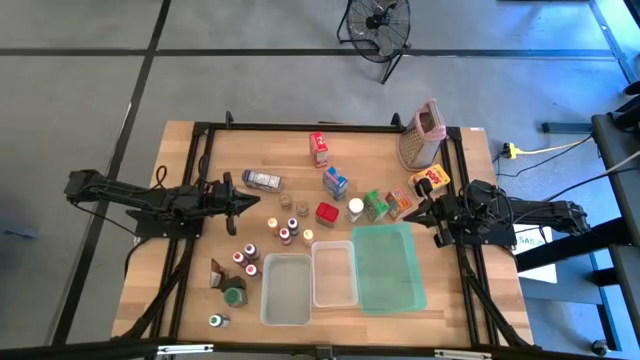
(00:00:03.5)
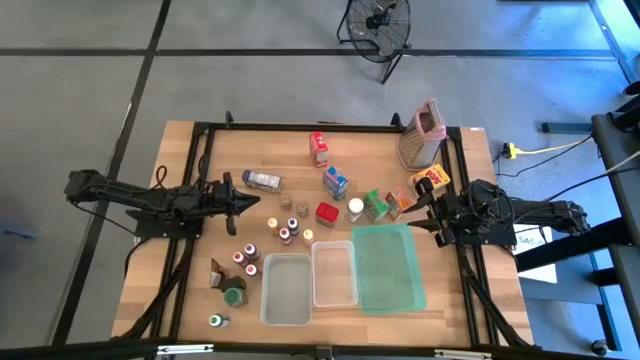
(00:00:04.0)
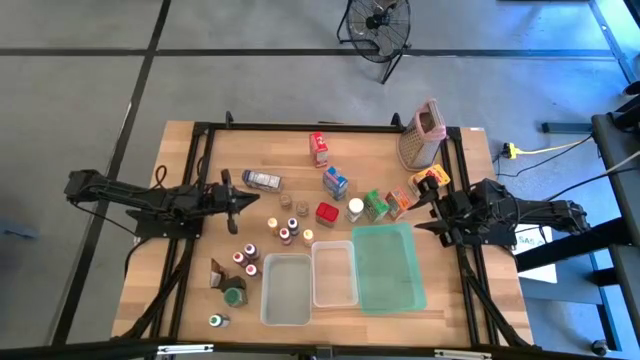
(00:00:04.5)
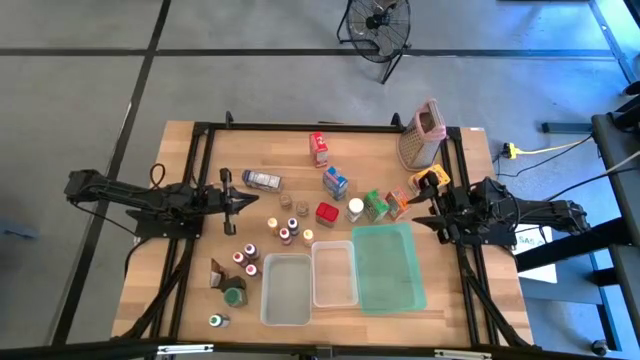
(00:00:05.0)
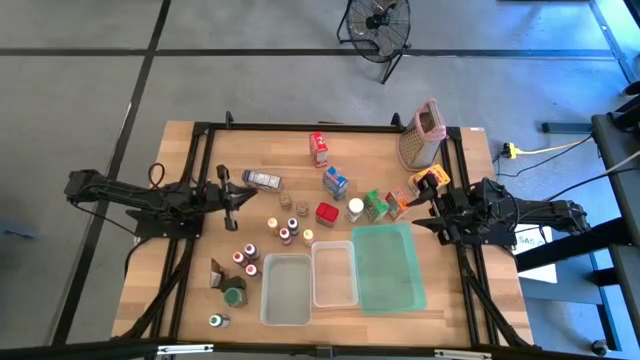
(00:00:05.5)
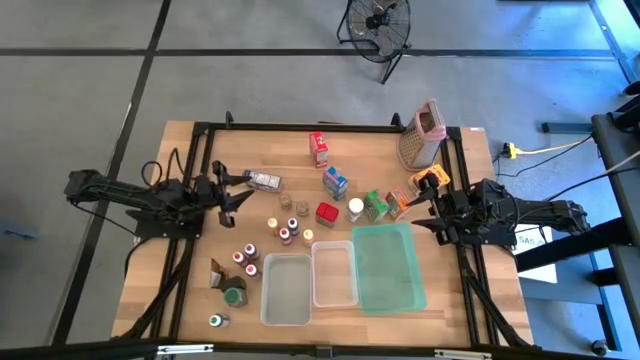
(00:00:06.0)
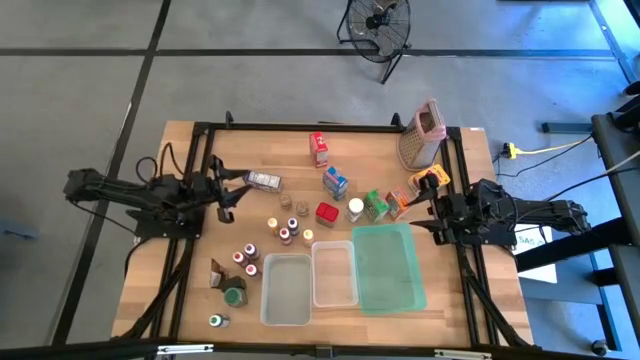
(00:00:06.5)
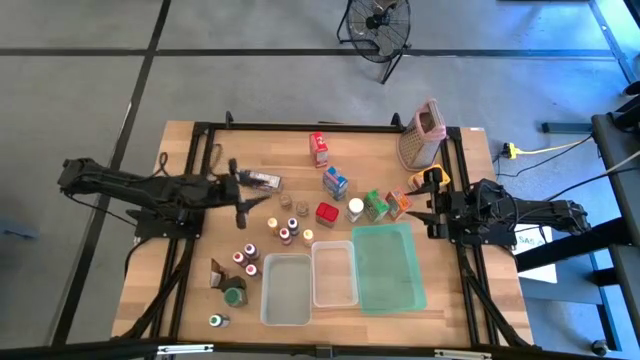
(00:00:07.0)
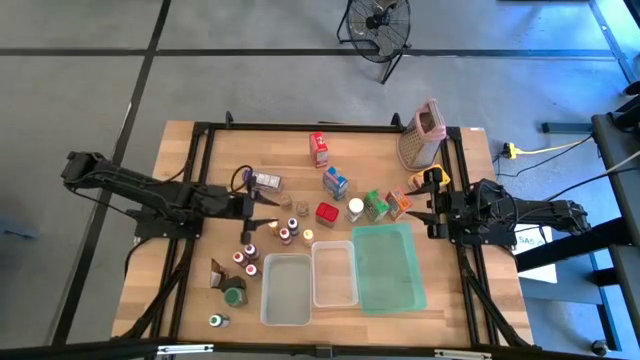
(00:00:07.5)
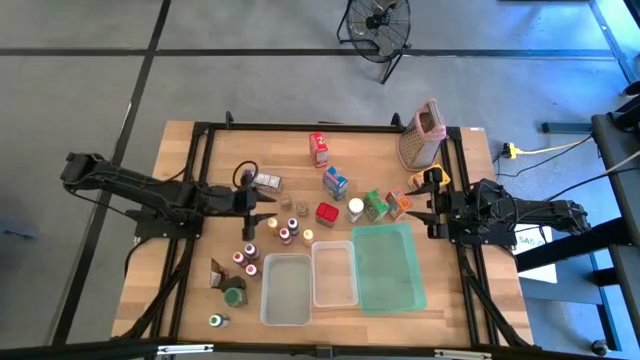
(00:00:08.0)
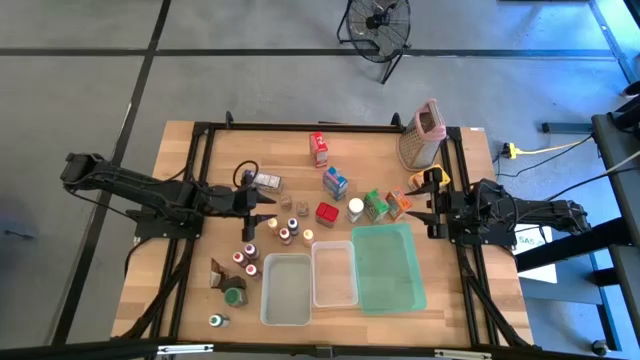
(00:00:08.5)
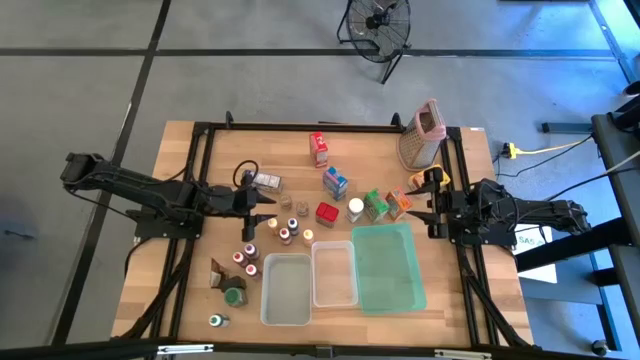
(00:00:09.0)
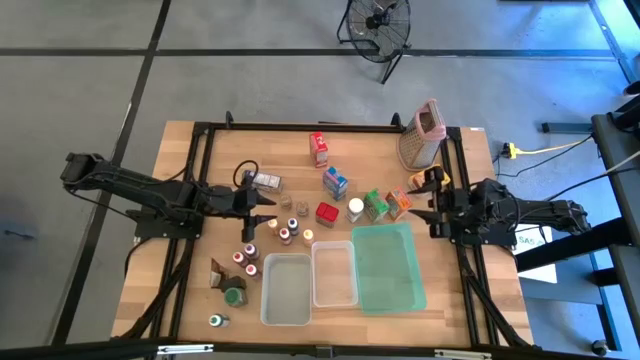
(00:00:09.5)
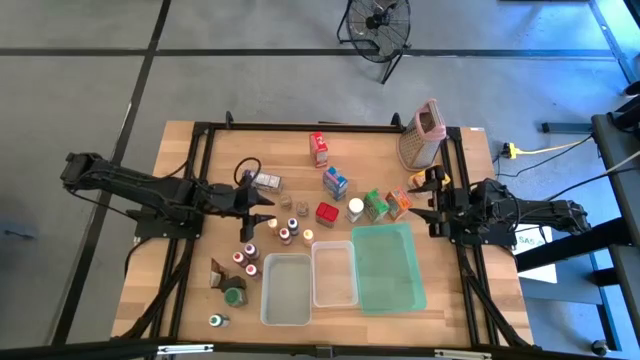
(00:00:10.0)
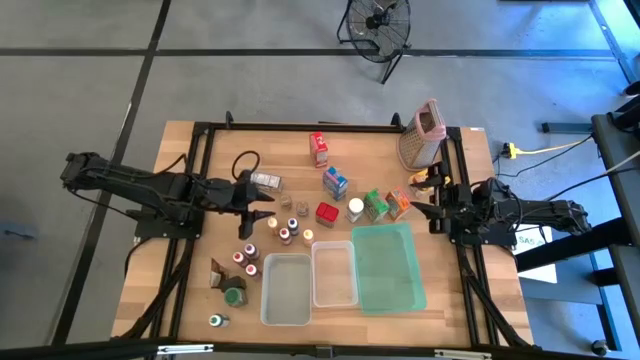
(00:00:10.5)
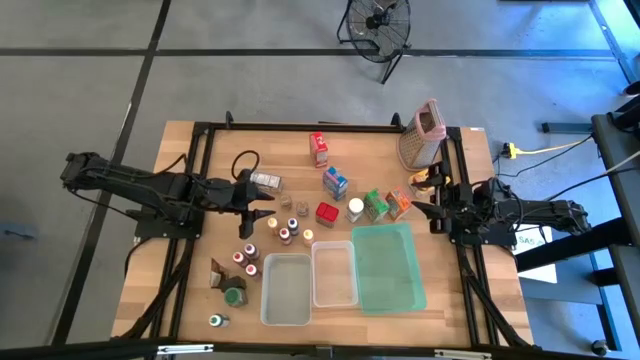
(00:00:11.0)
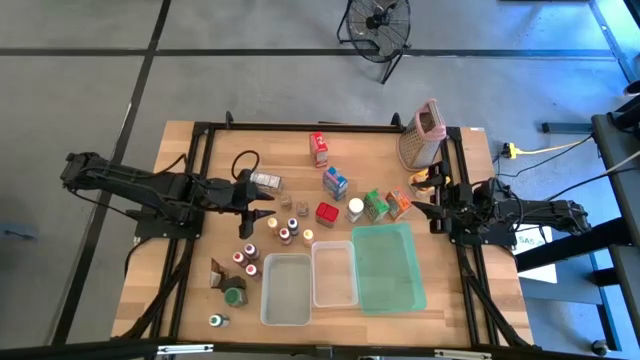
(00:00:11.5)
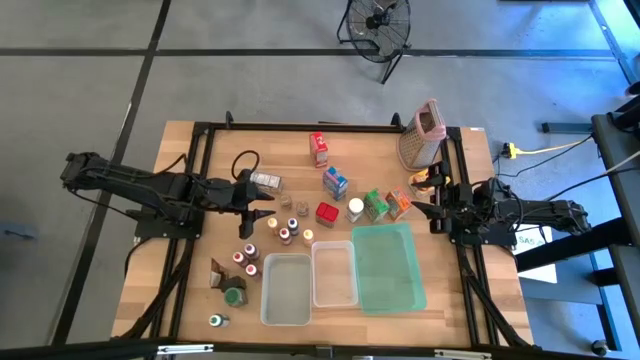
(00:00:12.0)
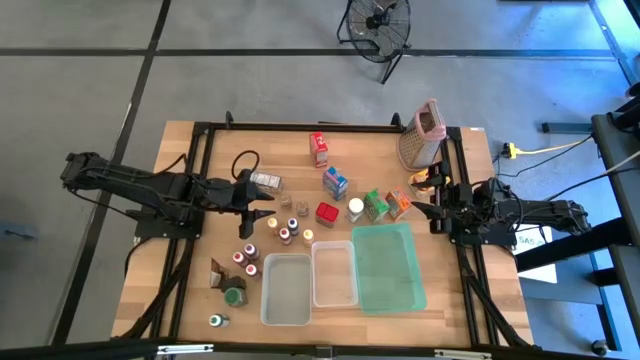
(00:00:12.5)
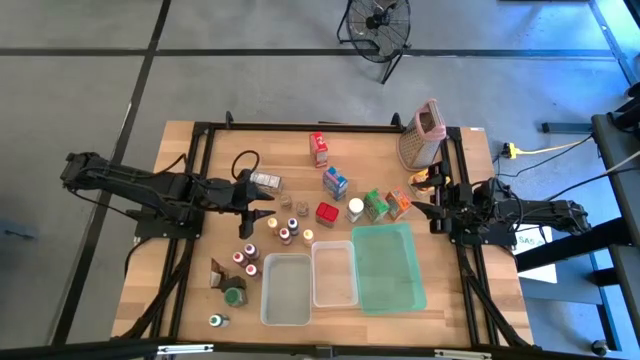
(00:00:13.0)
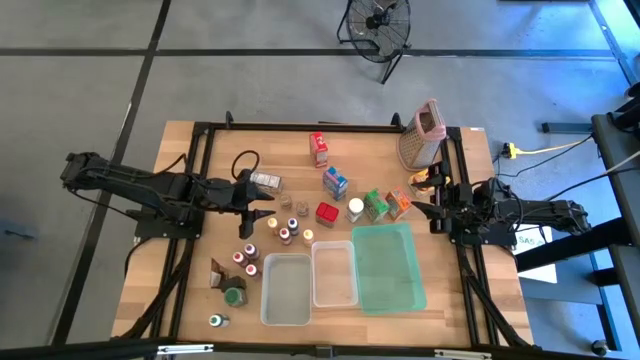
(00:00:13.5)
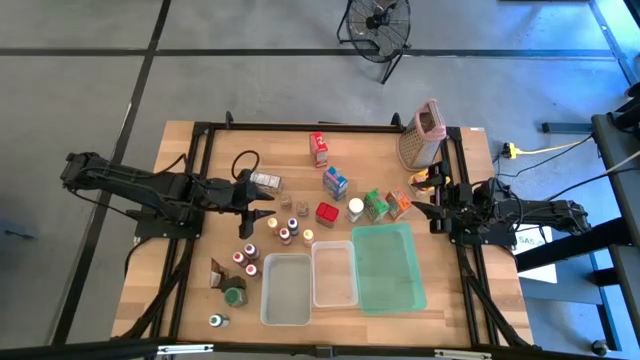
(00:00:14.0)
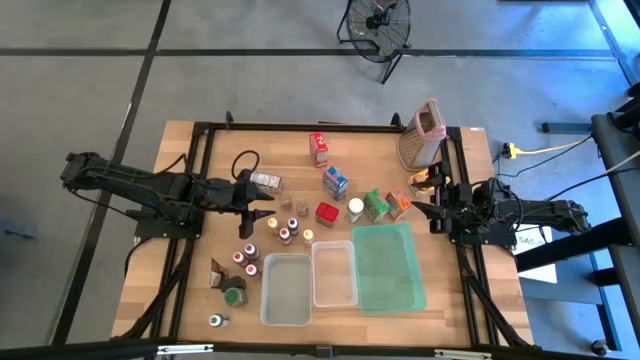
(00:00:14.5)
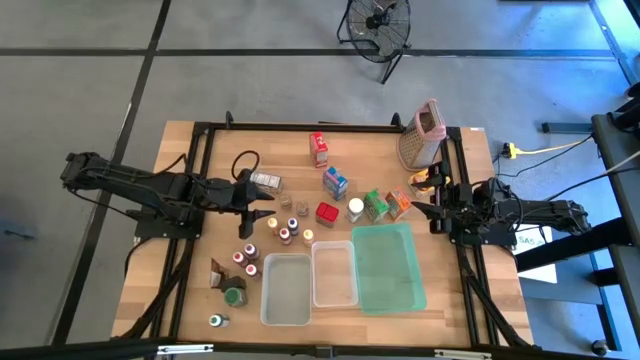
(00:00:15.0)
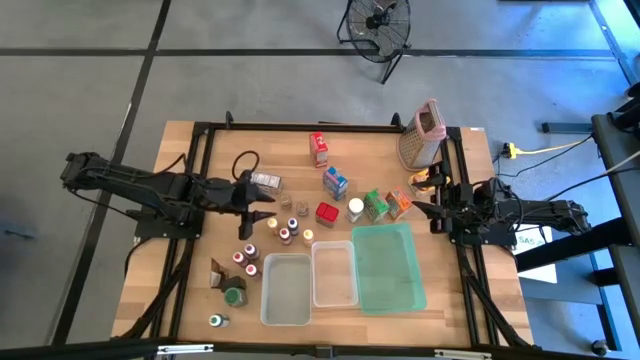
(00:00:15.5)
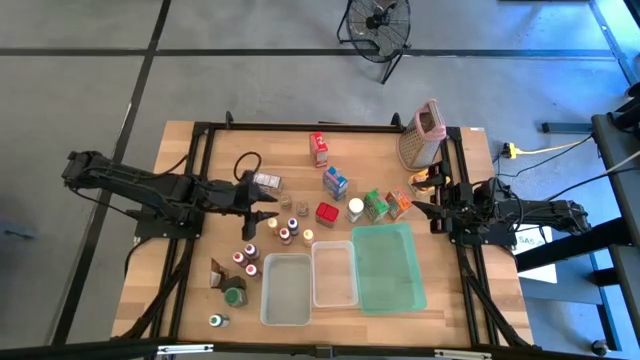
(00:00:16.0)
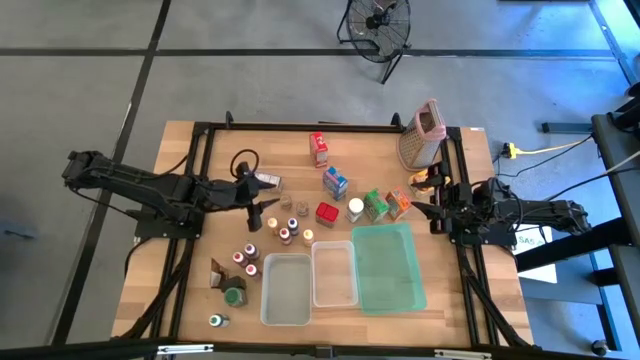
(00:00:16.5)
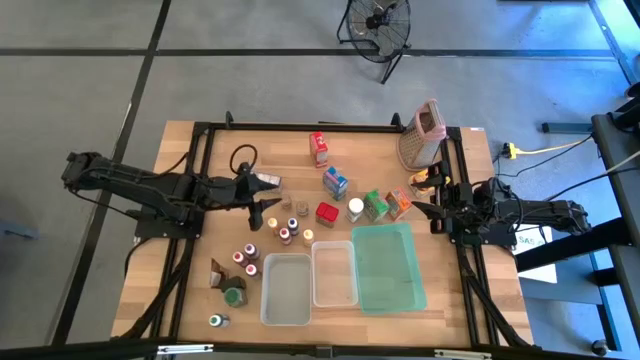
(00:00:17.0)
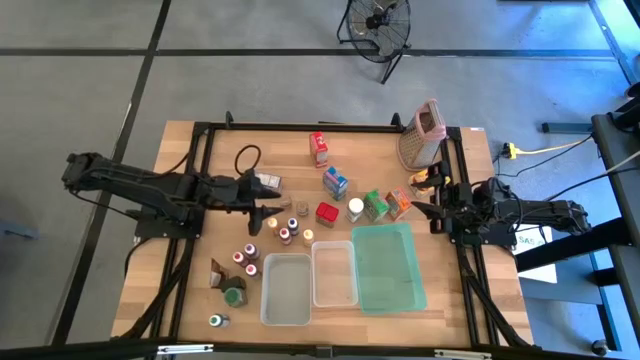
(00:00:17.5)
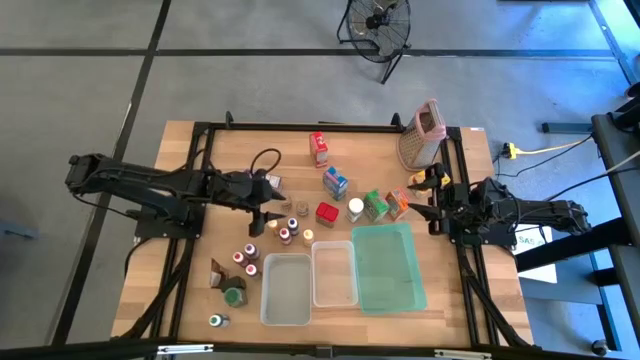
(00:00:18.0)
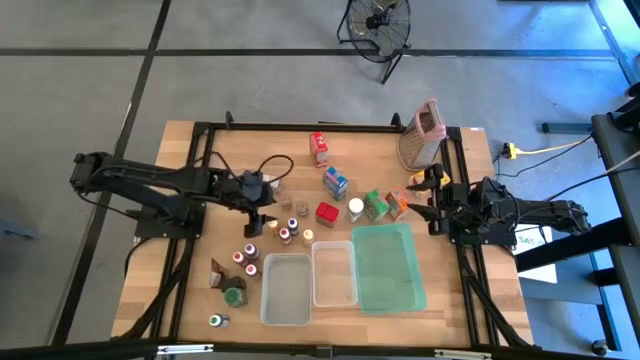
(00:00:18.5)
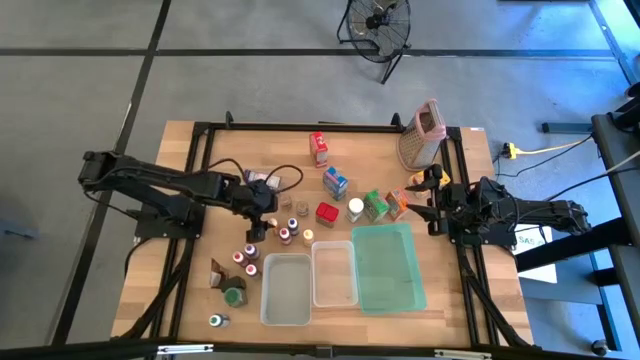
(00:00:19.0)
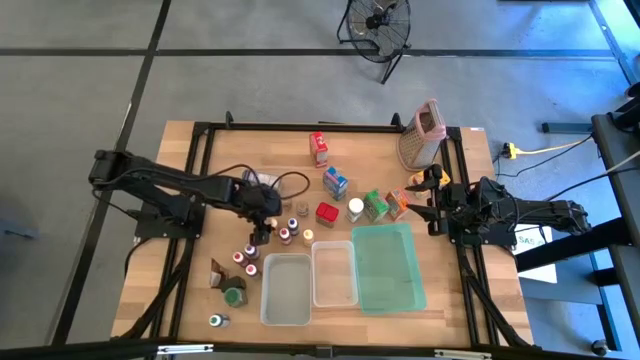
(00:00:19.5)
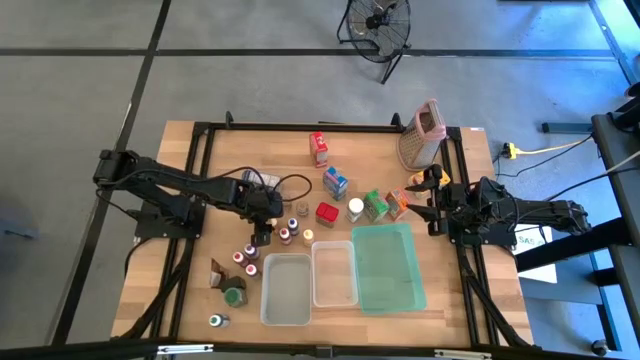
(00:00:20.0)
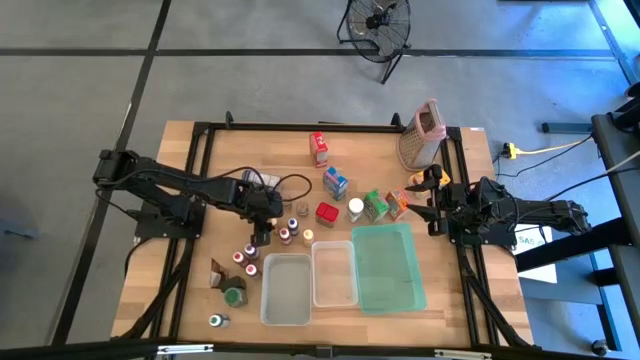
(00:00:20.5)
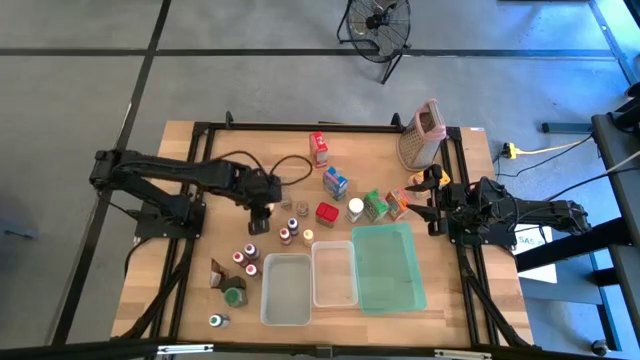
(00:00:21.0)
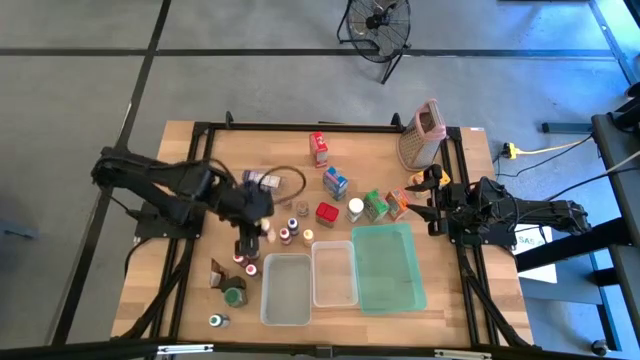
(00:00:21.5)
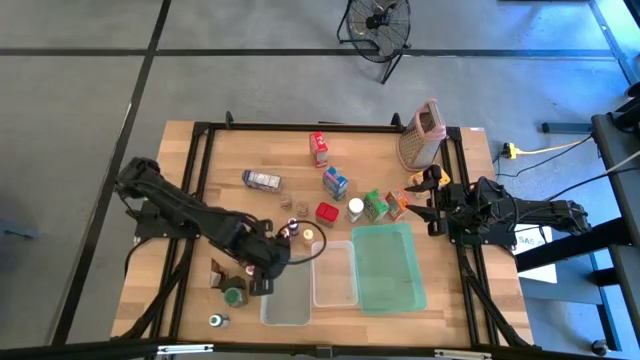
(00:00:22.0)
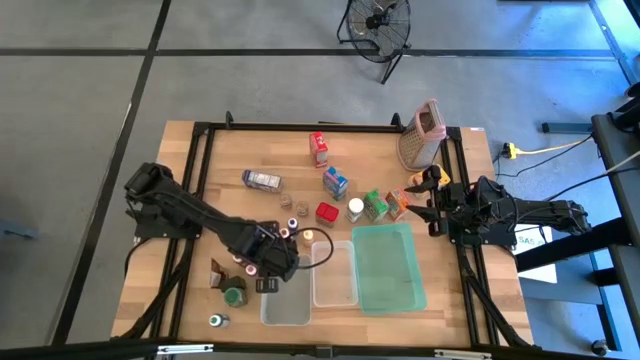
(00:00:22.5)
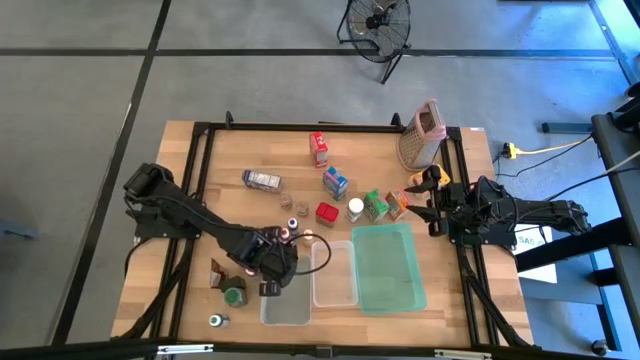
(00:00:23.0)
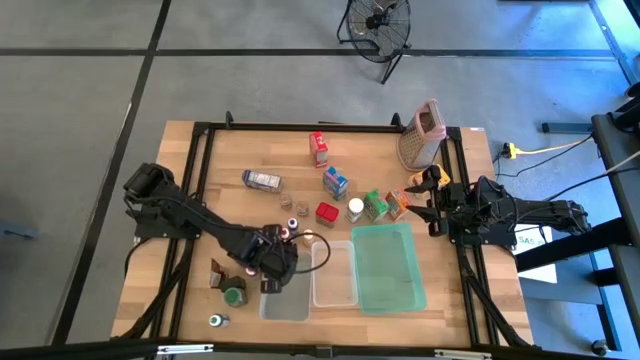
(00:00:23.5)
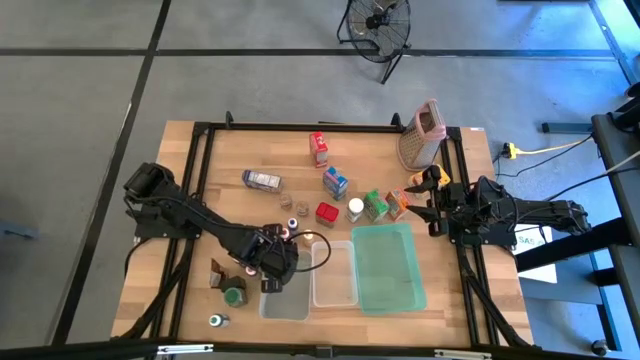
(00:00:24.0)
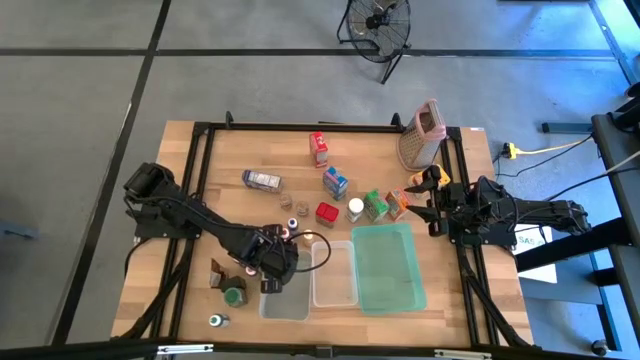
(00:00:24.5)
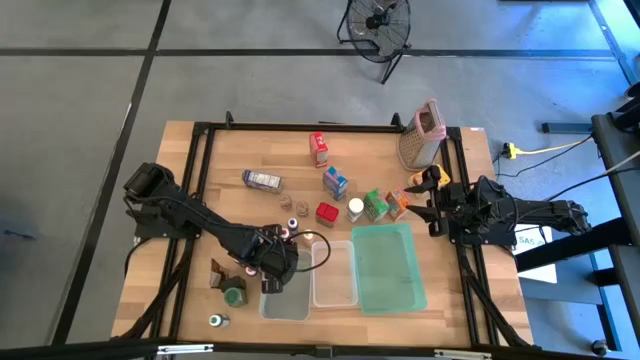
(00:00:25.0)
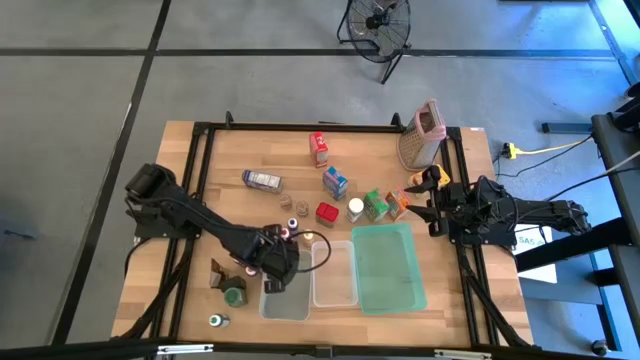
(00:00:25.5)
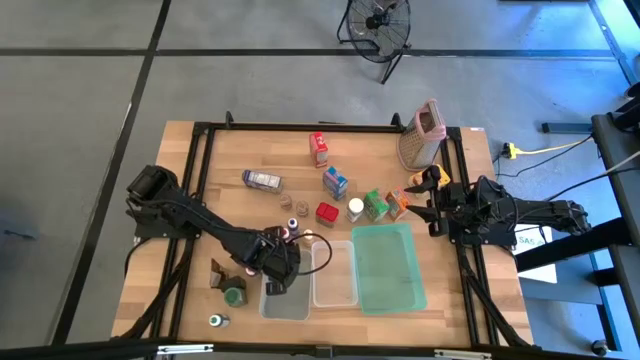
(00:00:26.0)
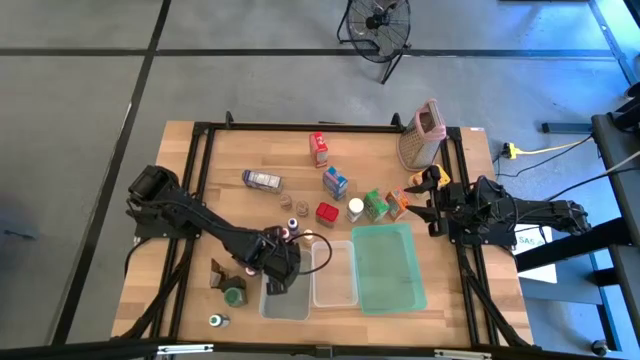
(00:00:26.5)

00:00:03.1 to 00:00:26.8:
Task: Pick & Place Kitchen Items
Put the yellow food coloring bottle into the gray bin
